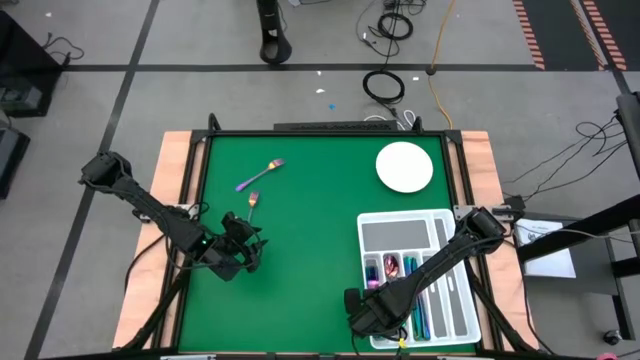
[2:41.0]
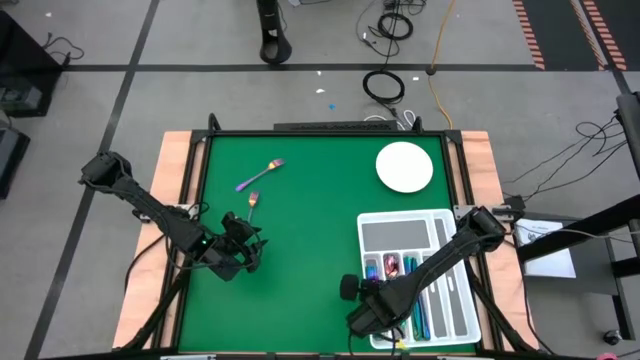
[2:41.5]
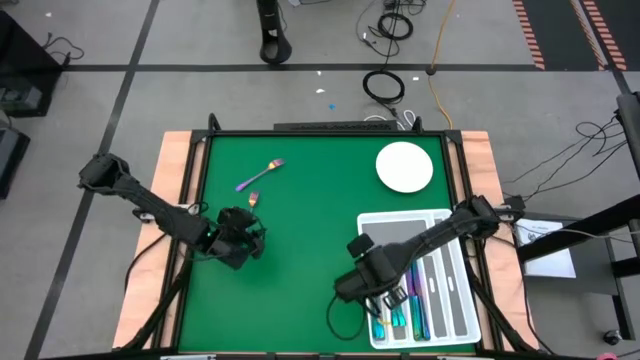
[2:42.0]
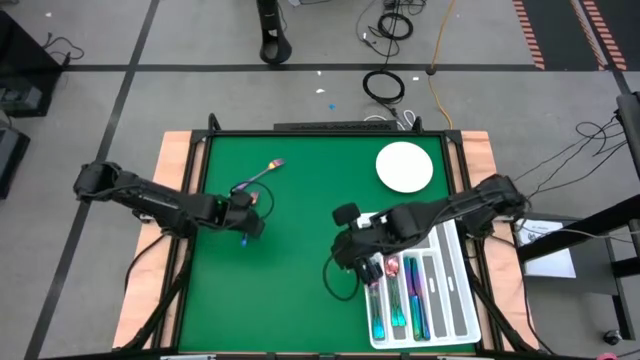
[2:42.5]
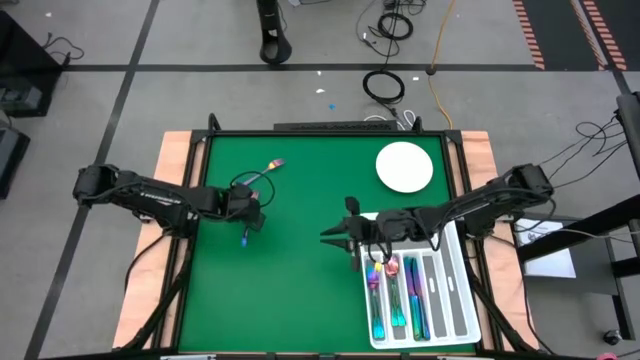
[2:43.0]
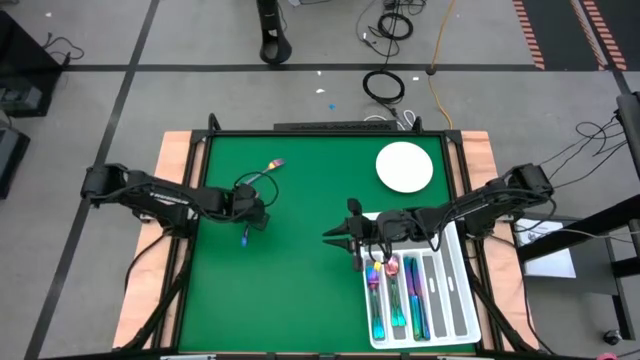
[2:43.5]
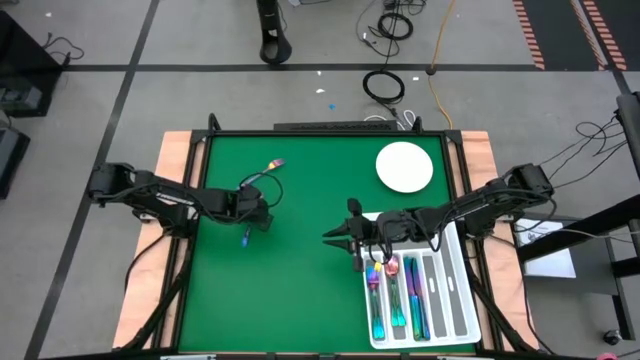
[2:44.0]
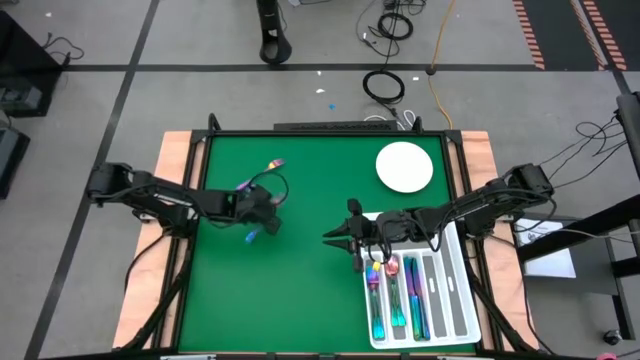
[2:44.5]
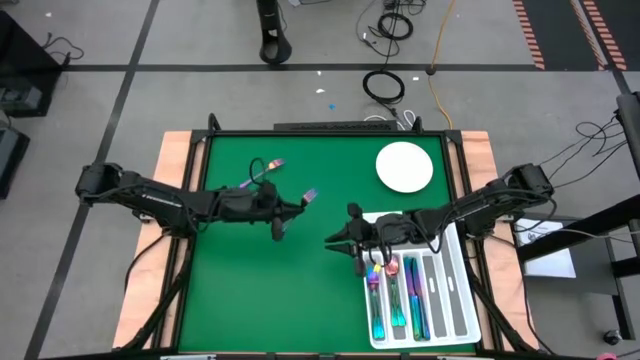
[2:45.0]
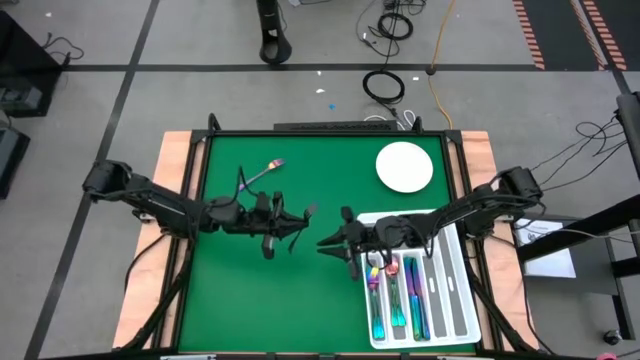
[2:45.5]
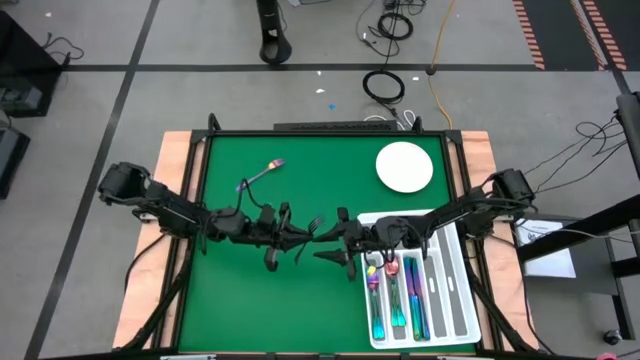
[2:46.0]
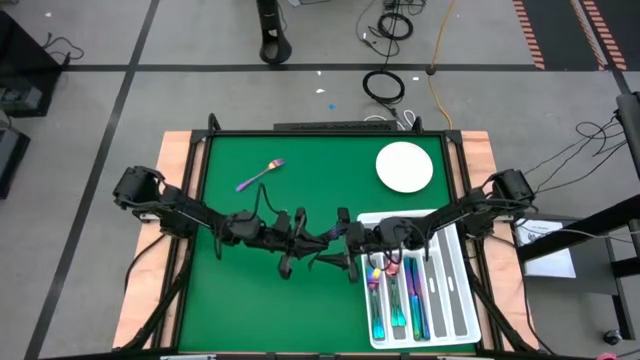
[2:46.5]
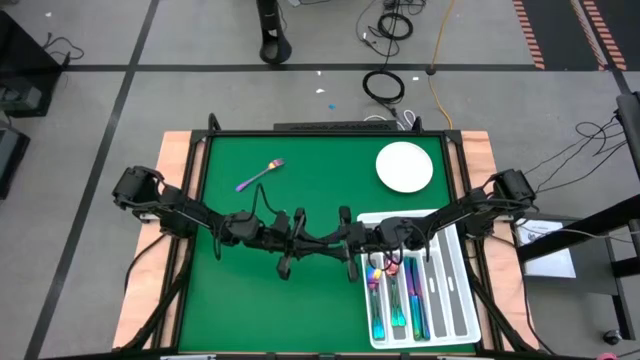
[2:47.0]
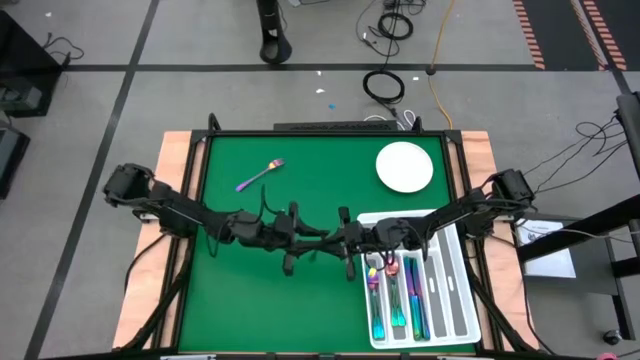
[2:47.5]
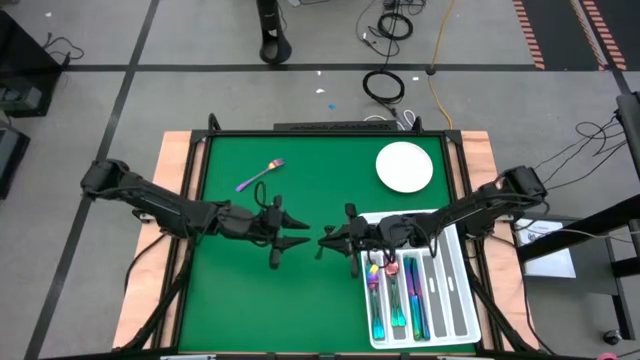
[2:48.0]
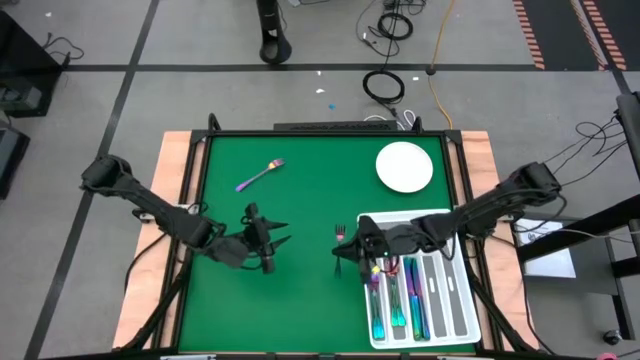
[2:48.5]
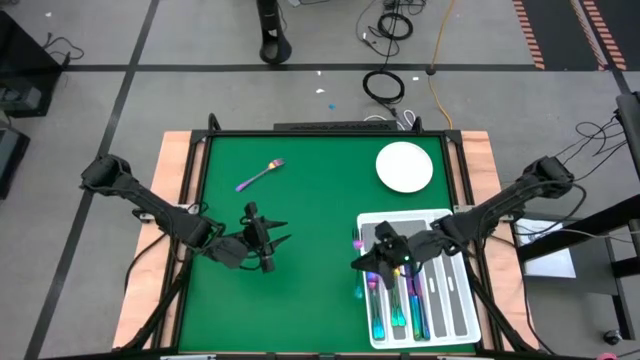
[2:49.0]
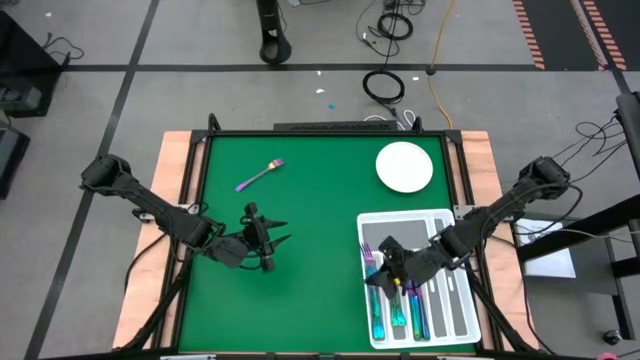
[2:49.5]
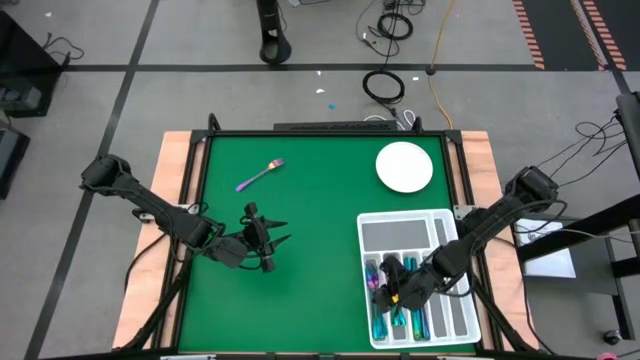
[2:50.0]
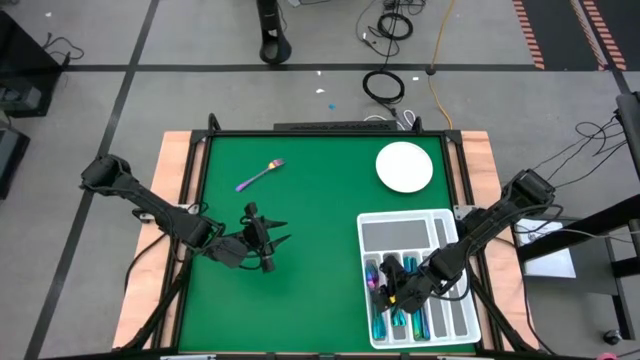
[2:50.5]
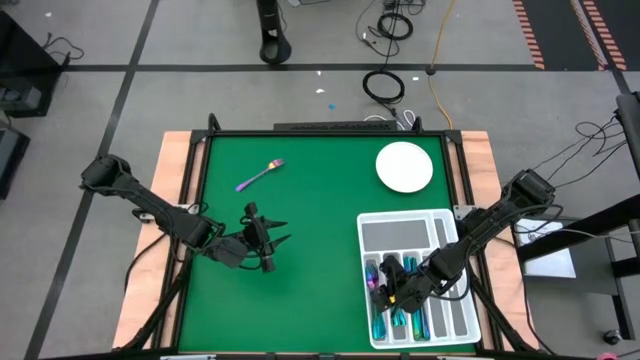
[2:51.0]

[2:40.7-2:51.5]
Task: Sort silverware
Put the bottom fork into the utensil organizer

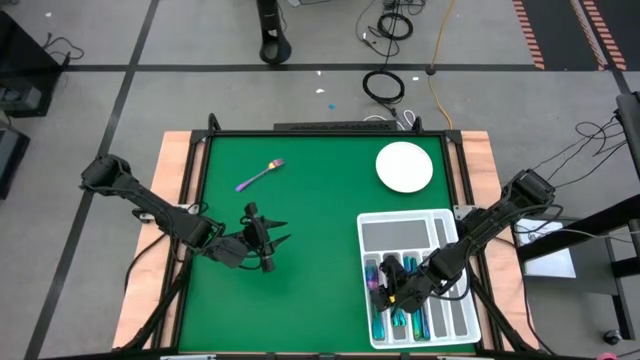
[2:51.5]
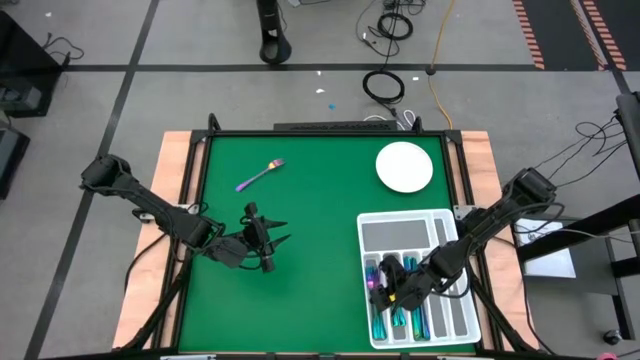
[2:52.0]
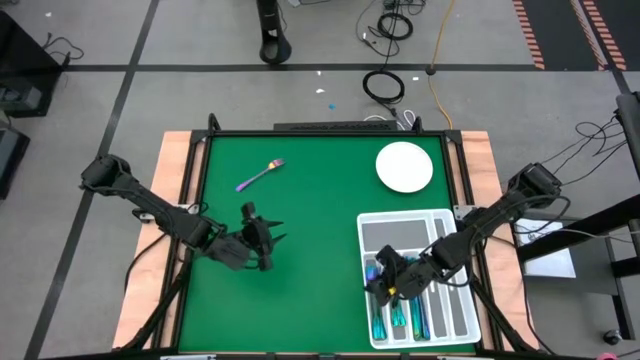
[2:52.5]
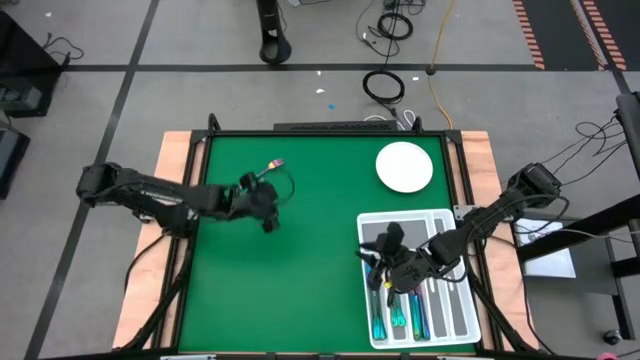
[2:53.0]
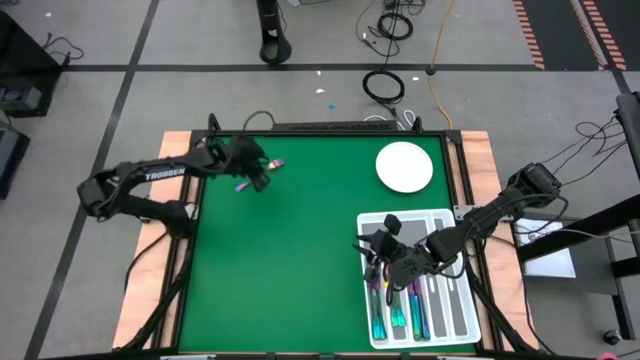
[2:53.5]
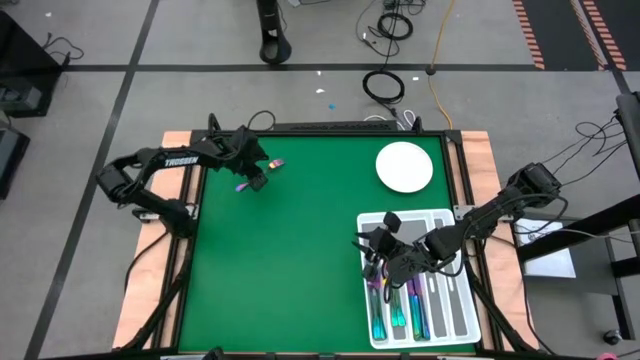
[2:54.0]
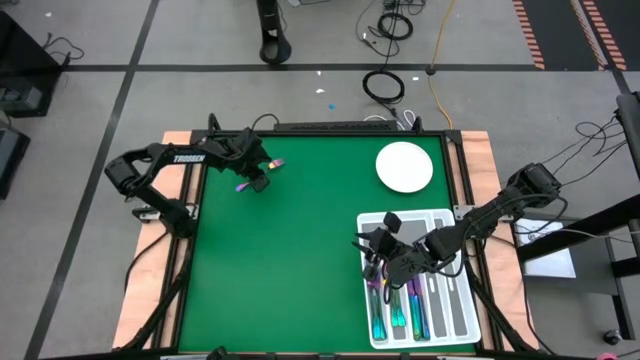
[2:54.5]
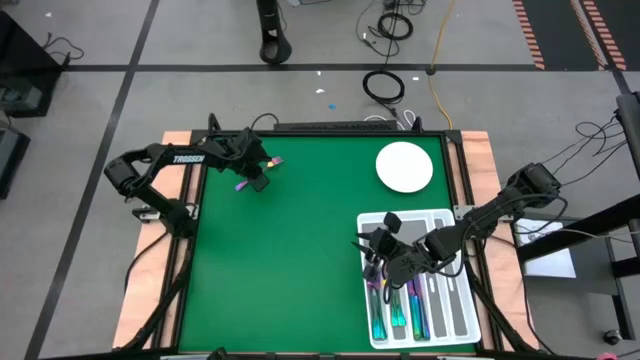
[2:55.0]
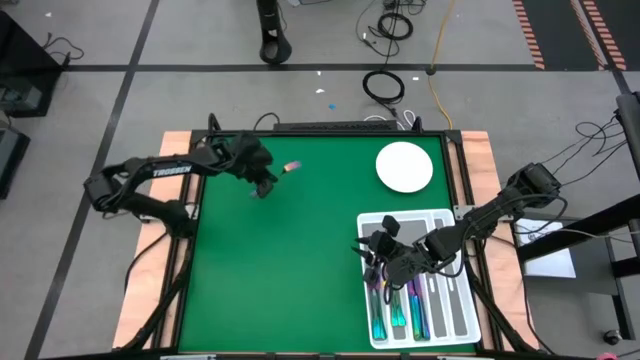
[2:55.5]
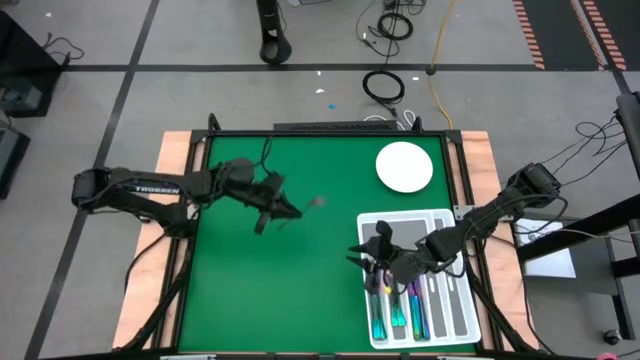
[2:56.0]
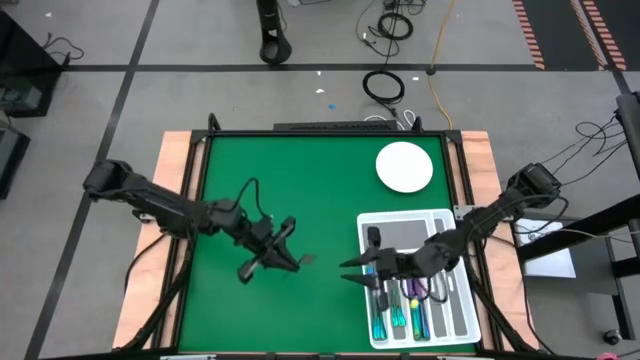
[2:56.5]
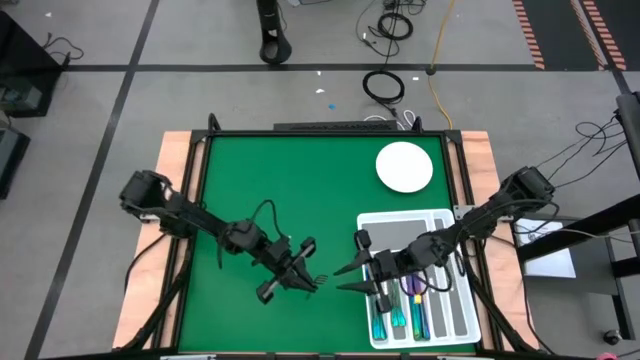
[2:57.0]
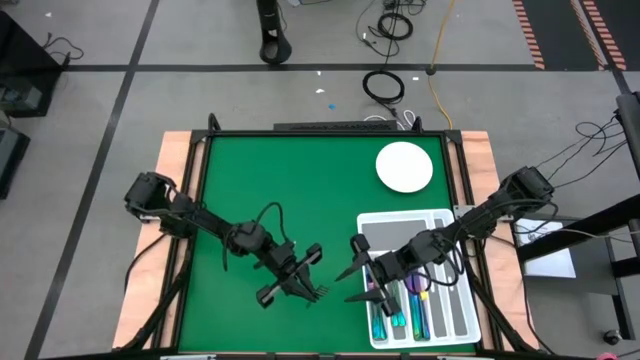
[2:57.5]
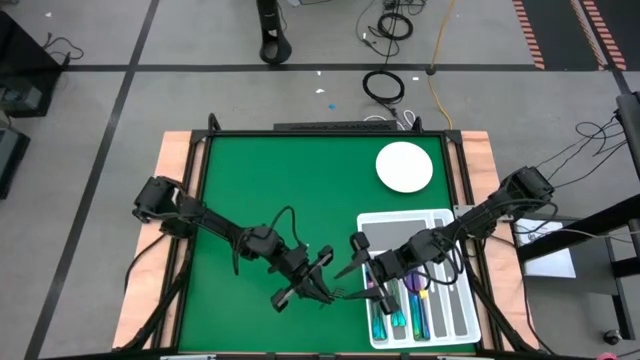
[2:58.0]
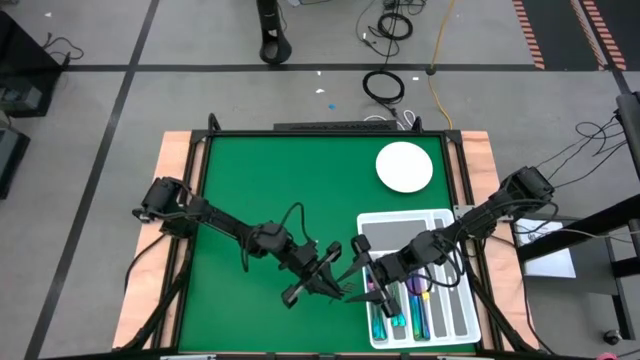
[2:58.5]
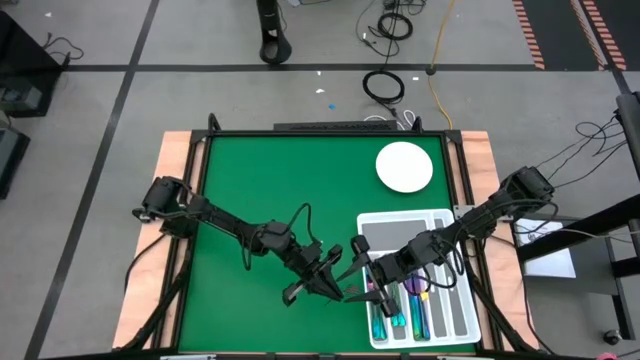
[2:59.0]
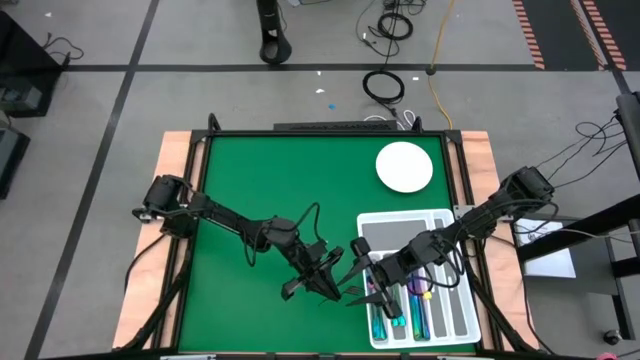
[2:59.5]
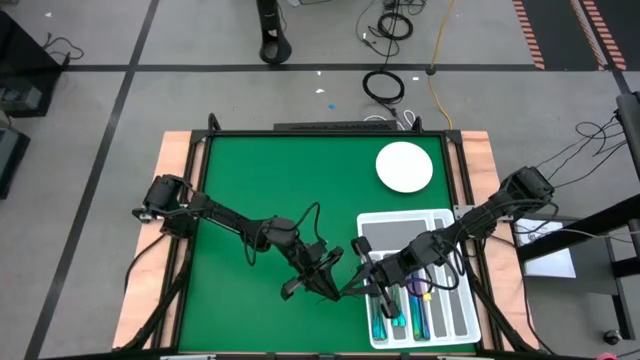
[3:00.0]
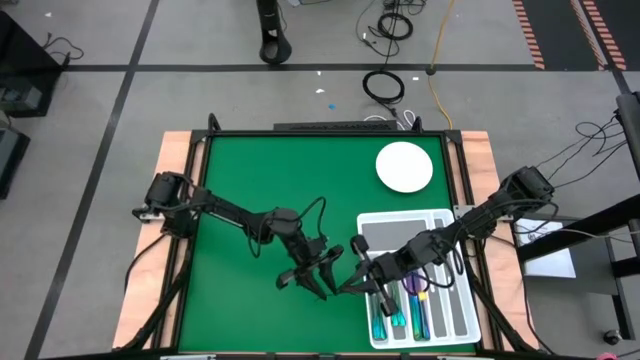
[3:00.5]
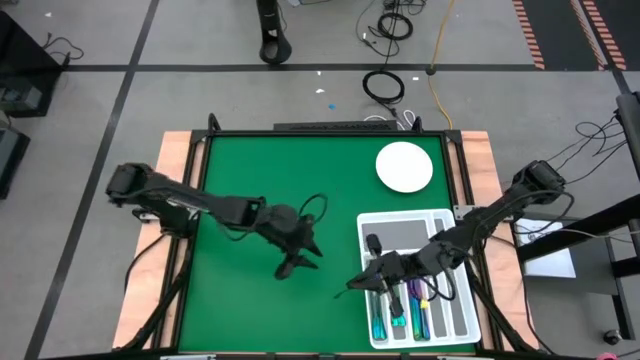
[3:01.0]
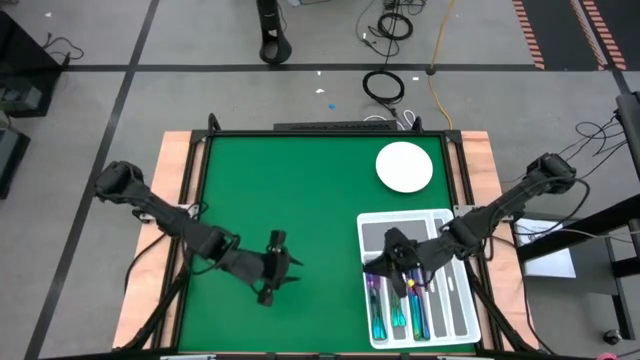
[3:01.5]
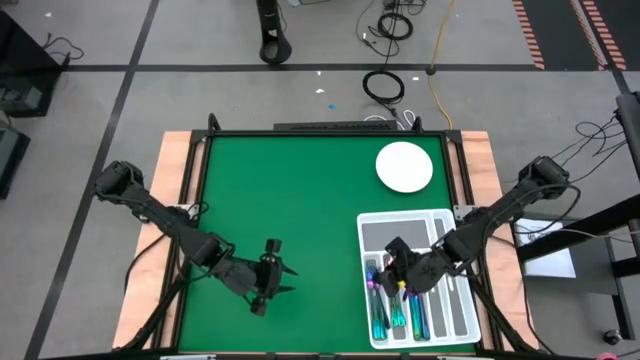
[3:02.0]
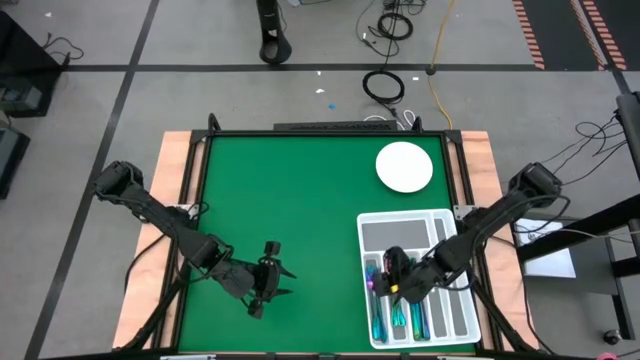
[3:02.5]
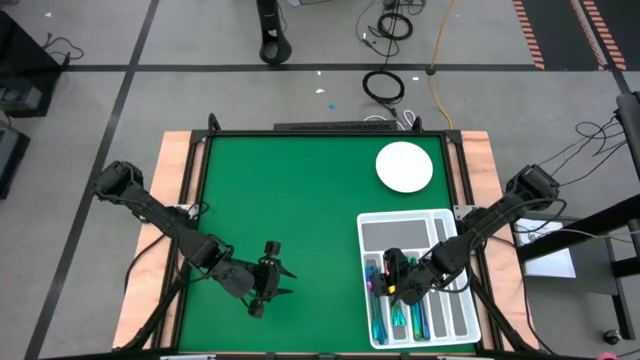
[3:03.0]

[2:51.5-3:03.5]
Put the fork into the utensil organizer
